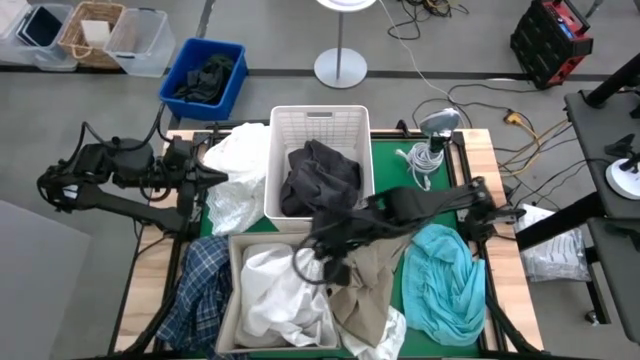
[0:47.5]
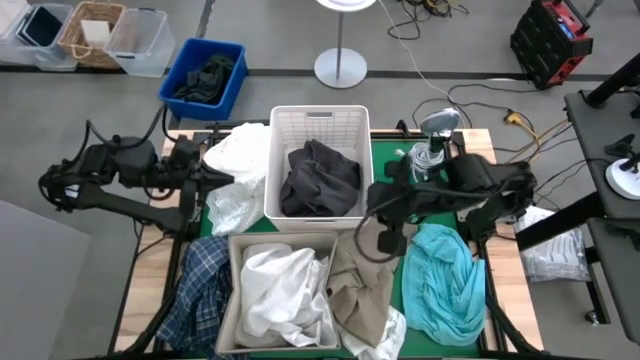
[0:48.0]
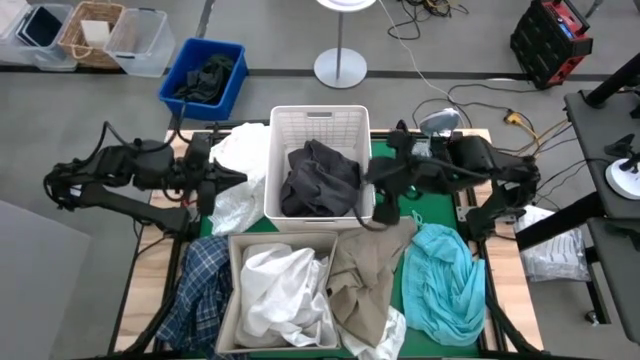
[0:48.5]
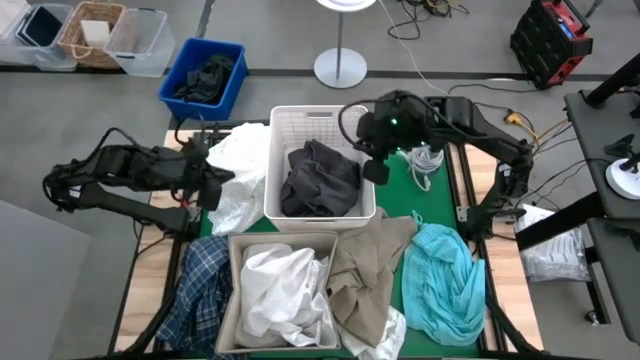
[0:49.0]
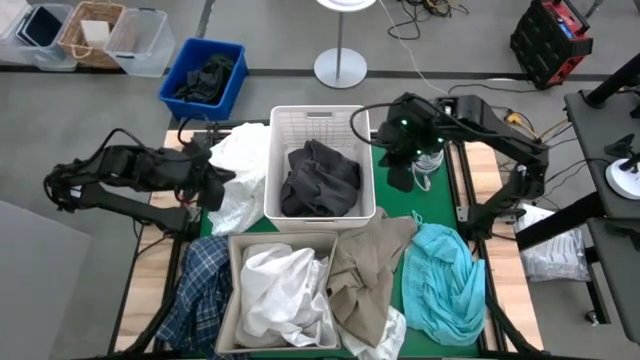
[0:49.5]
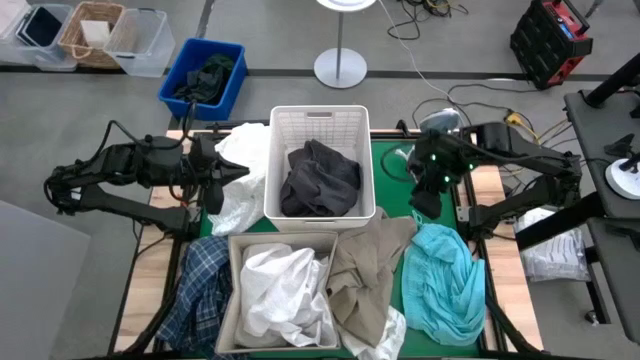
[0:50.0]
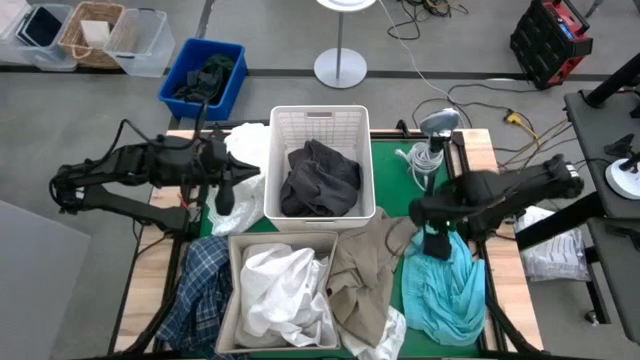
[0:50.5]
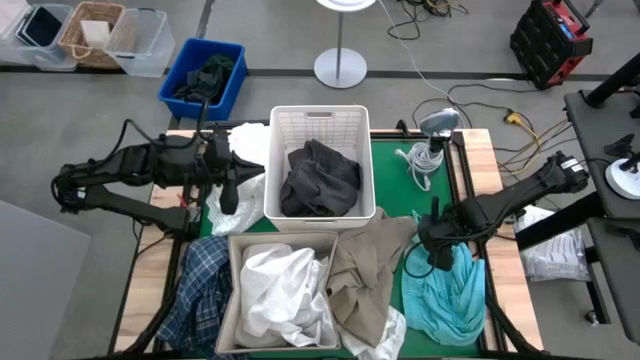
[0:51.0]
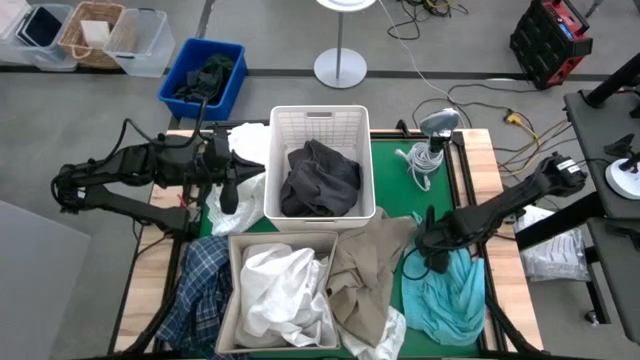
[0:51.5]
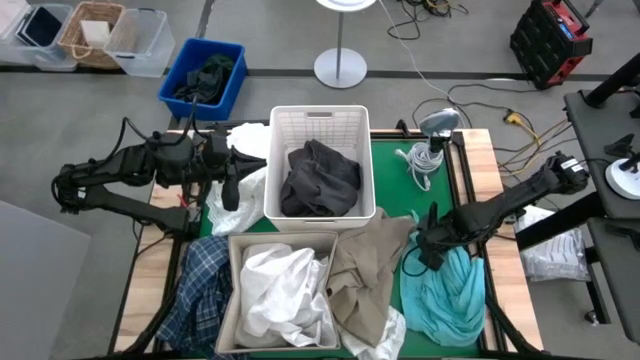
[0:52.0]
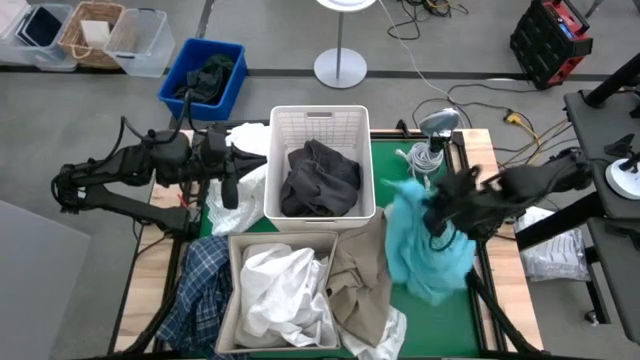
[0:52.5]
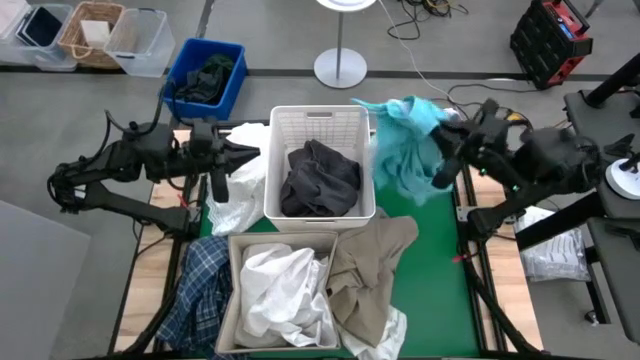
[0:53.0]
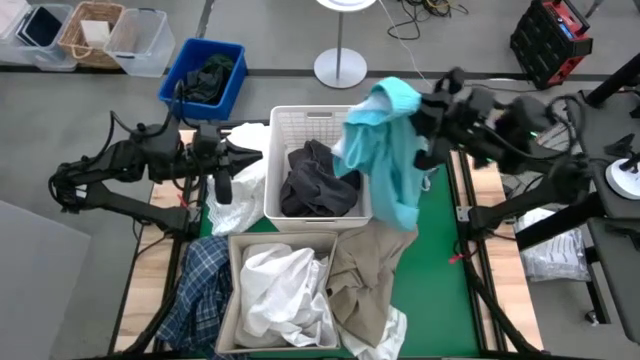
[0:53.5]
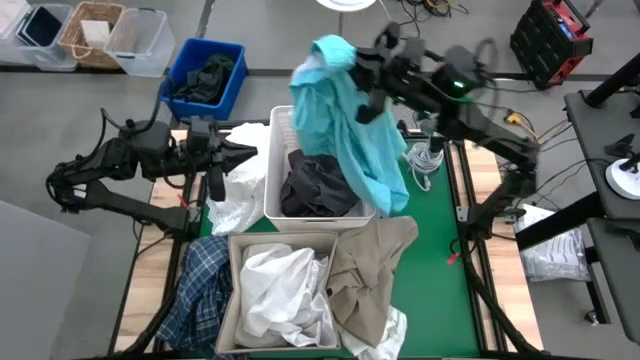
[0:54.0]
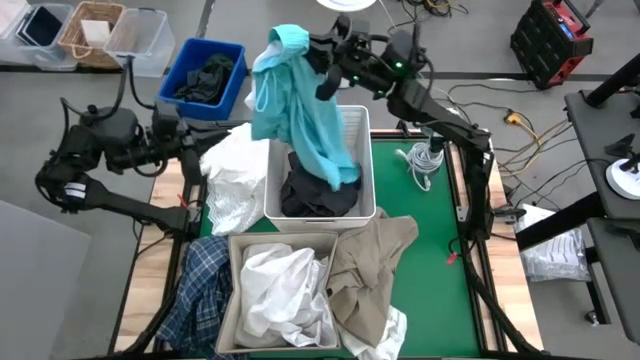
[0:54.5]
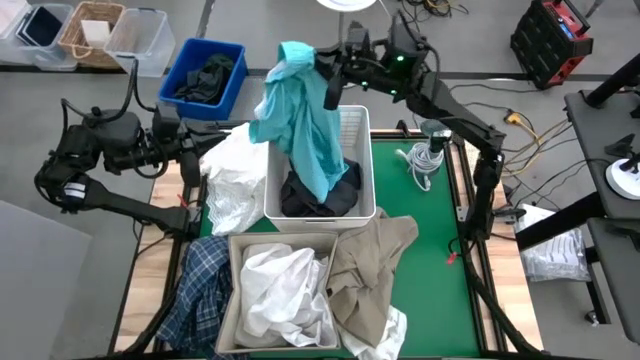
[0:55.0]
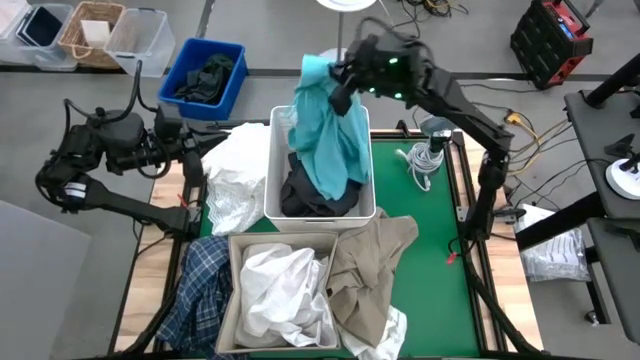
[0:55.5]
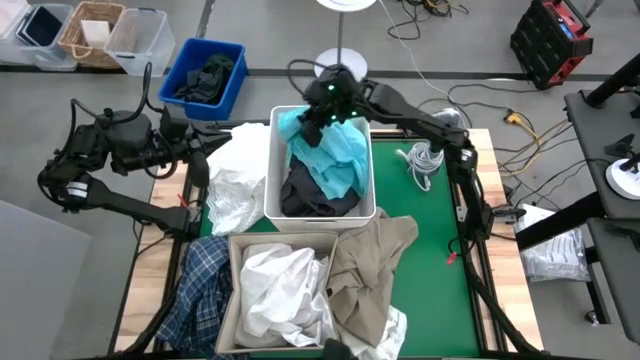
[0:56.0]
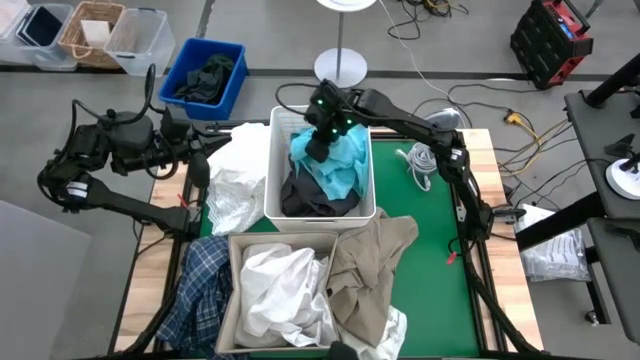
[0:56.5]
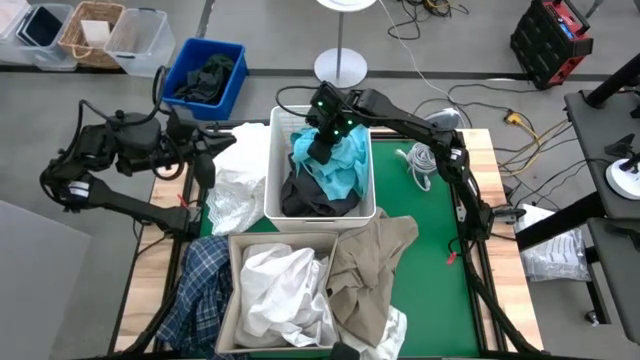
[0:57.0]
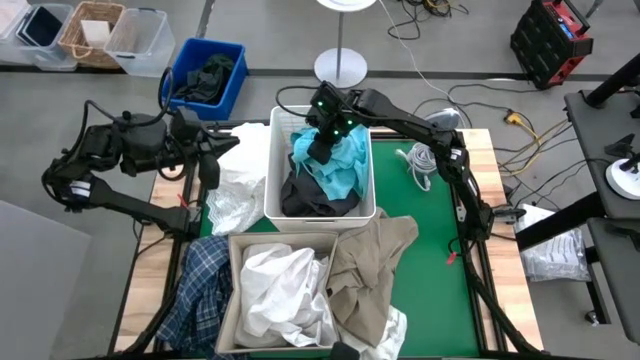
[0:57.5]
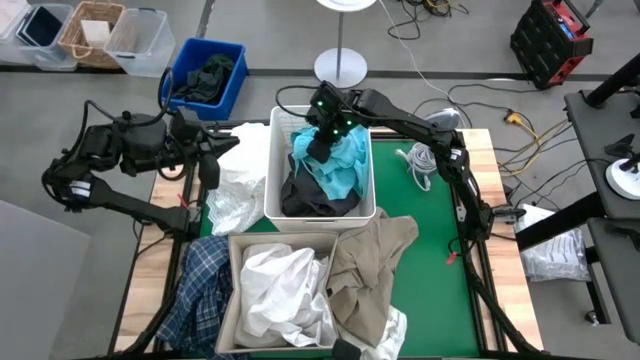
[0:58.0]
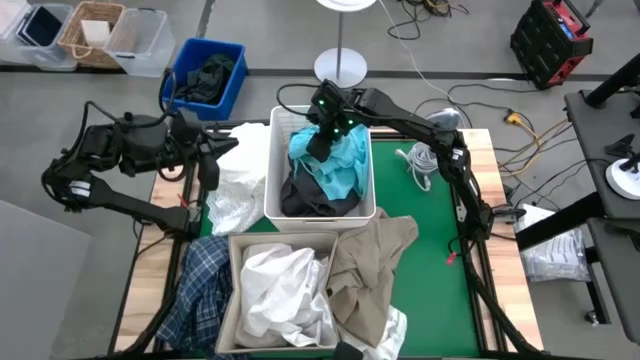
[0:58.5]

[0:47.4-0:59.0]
Task: Sort clothes
Put the blue short pants into the white bin

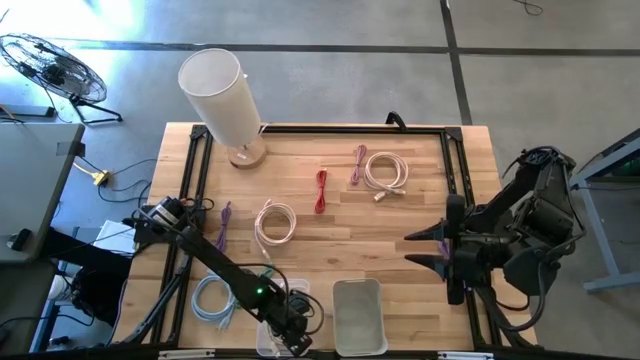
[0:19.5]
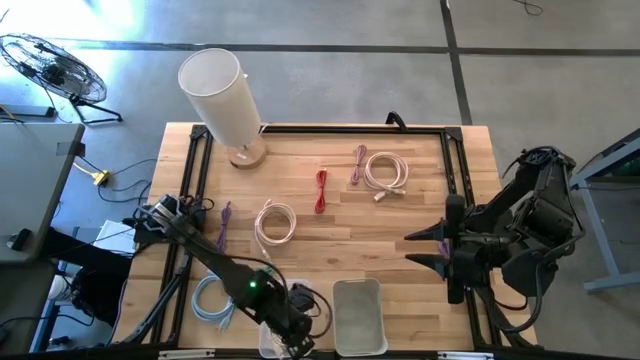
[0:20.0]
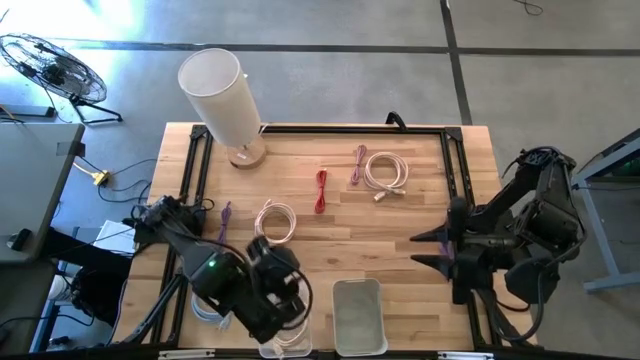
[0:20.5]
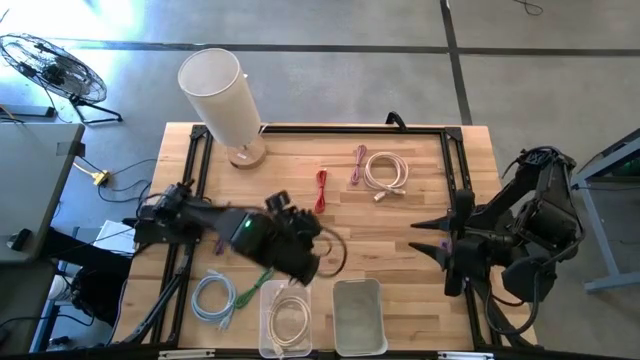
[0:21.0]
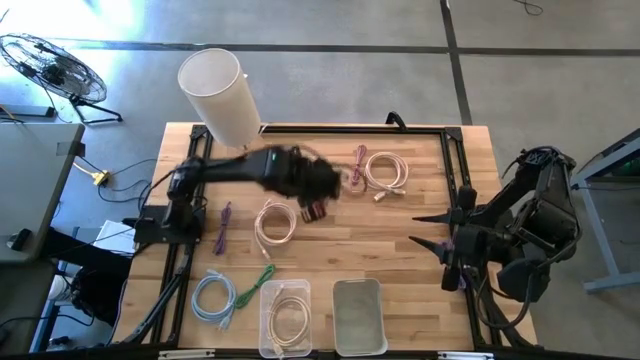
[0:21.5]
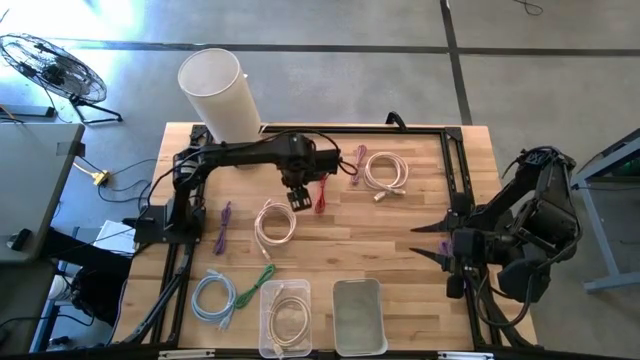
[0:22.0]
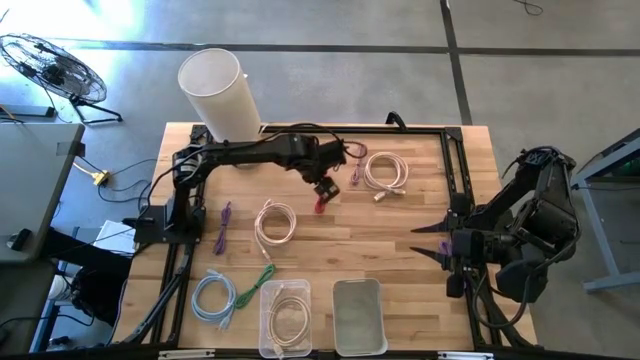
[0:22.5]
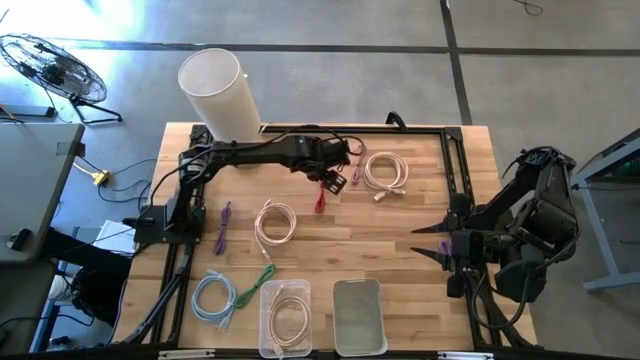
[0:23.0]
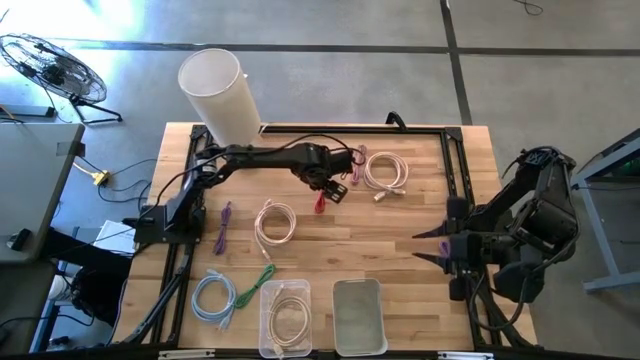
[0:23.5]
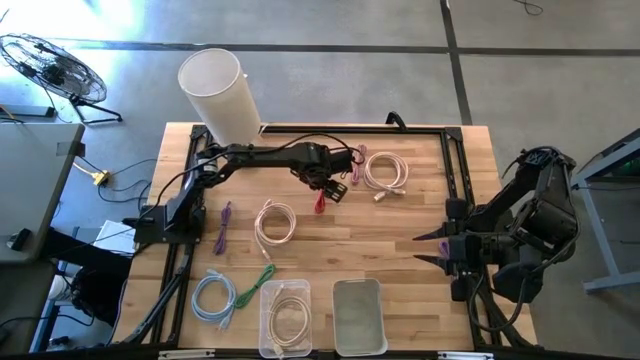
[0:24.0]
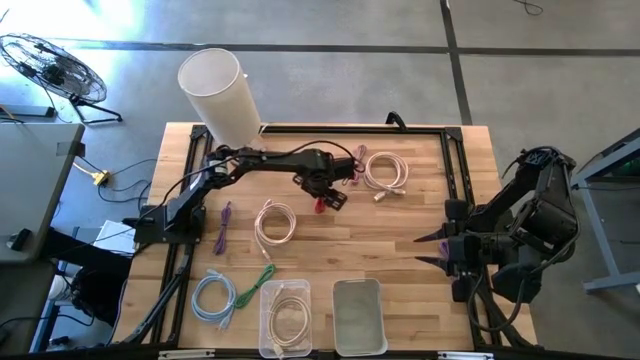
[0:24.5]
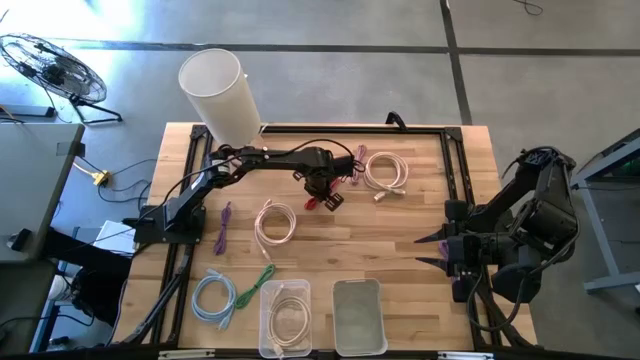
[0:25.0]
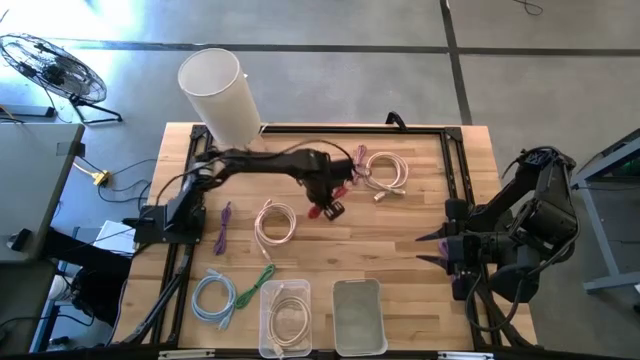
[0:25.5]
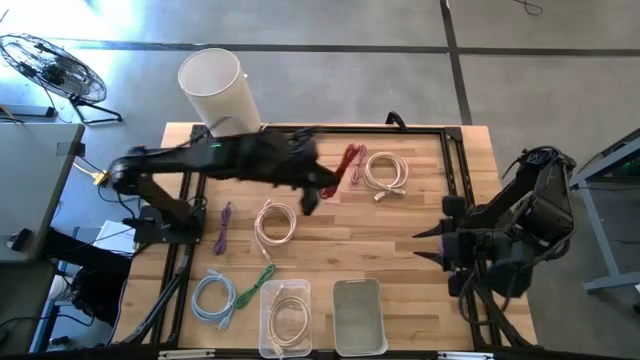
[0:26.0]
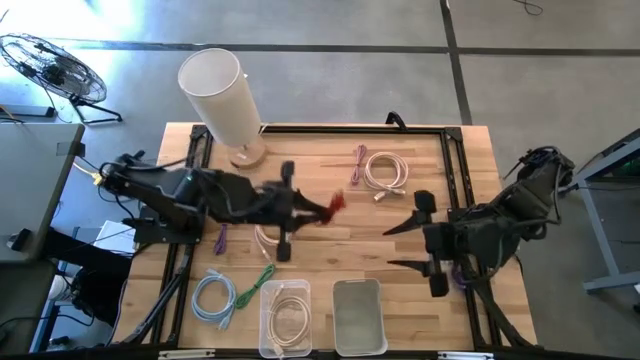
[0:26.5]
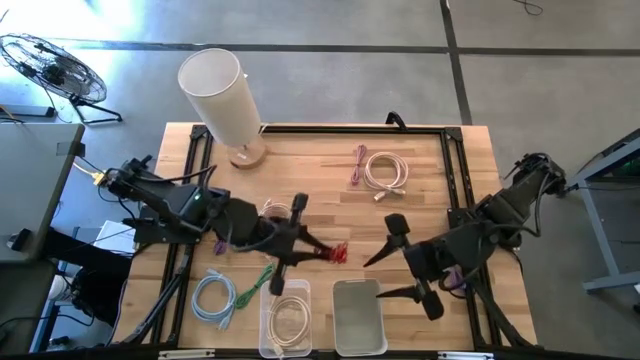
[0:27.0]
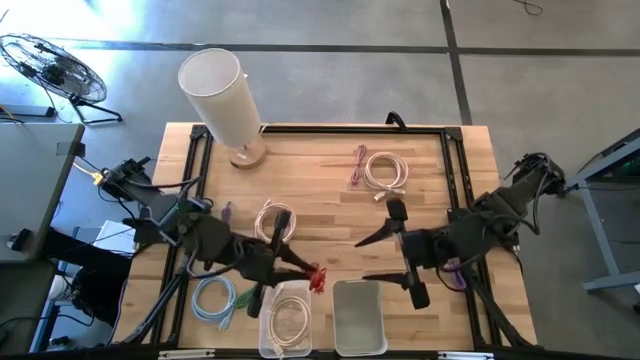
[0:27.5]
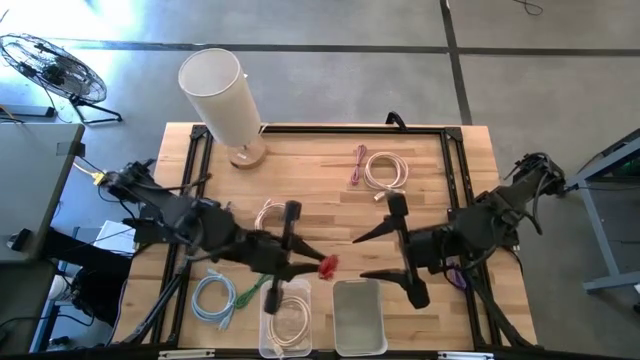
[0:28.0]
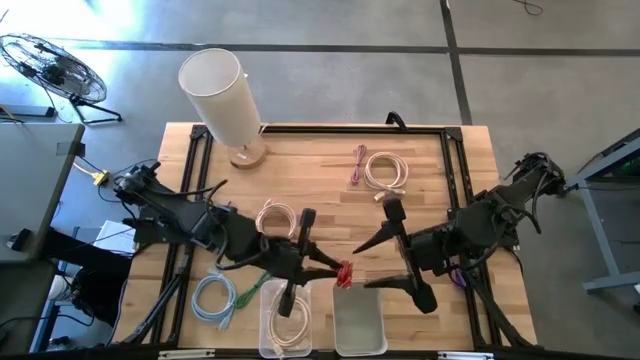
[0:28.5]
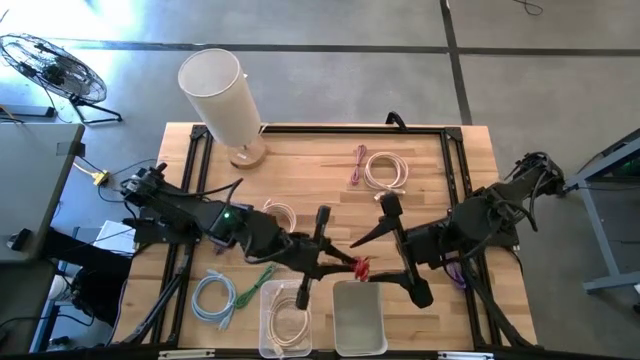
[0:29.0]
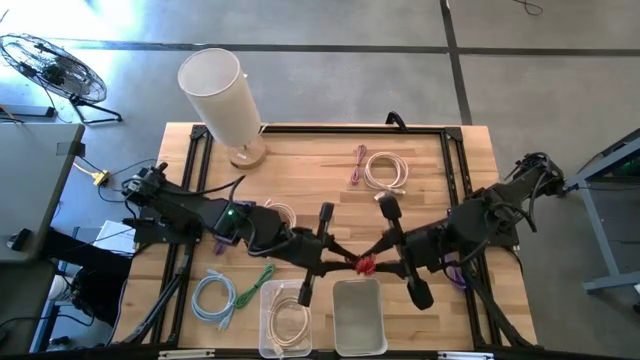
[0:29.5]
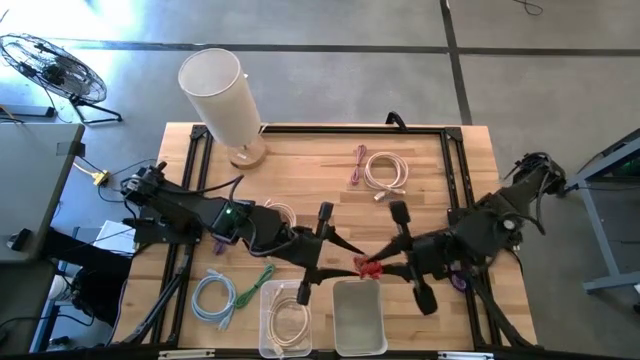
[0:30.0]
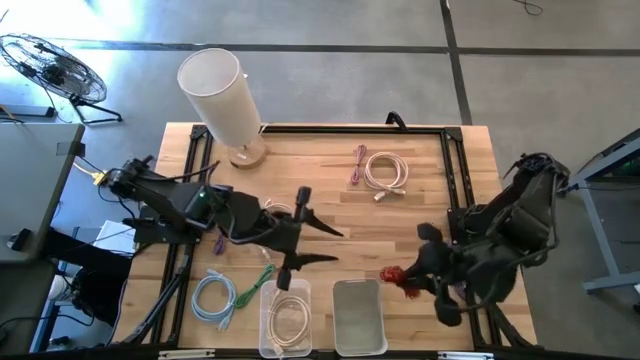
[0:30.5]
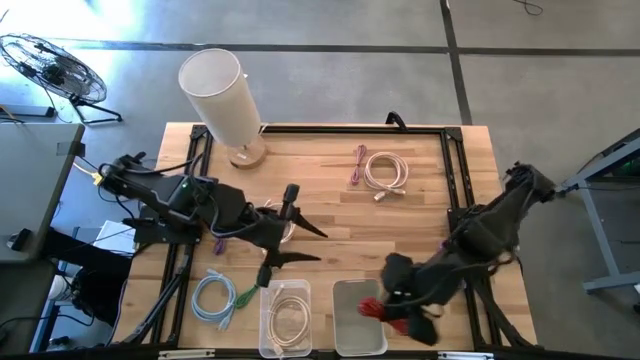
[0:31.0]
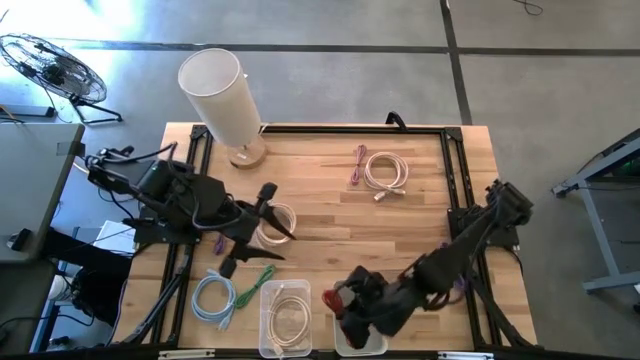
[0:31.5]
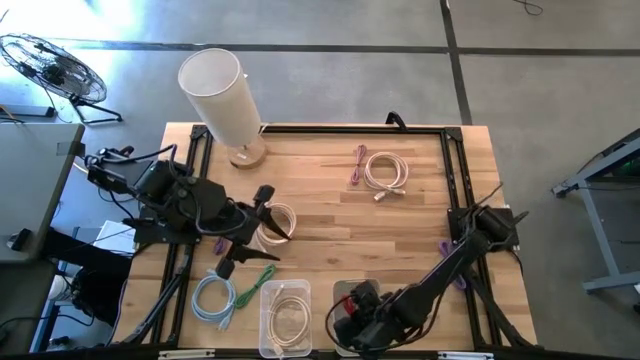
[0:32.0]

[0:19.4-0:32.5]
Task: Pick & Place USB Port
Put the red USB cable into the gray bin
